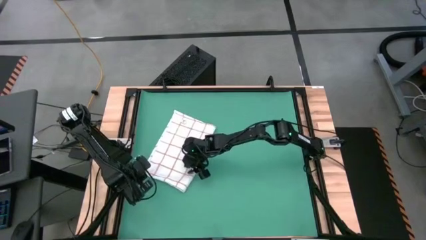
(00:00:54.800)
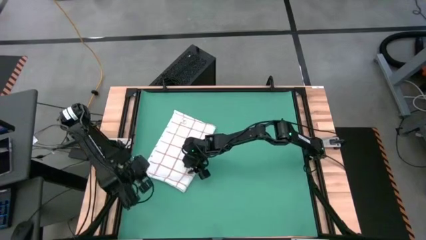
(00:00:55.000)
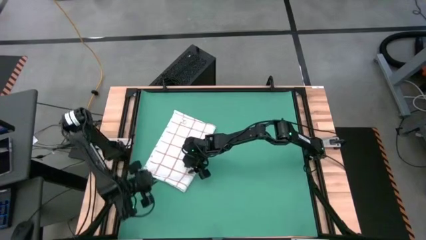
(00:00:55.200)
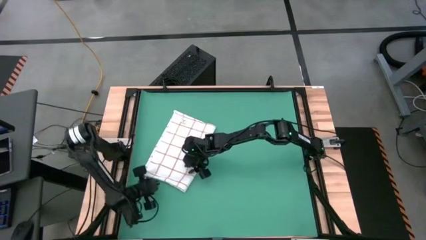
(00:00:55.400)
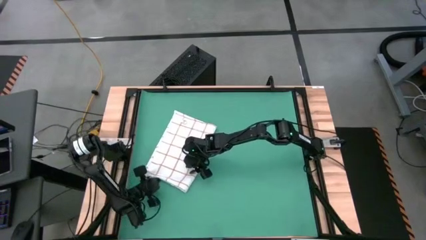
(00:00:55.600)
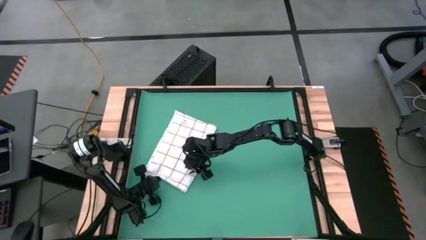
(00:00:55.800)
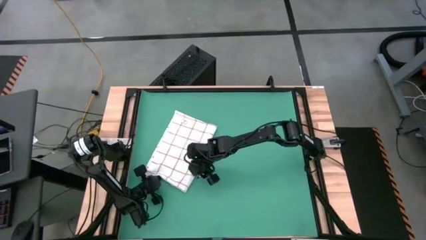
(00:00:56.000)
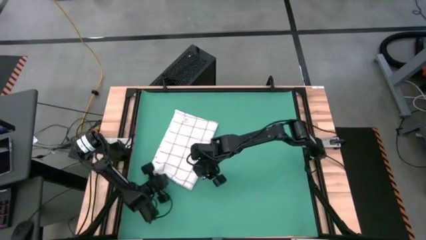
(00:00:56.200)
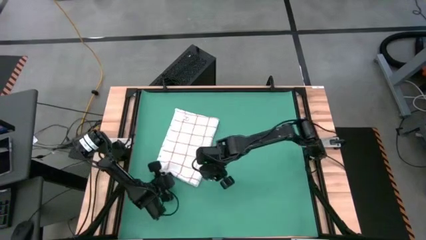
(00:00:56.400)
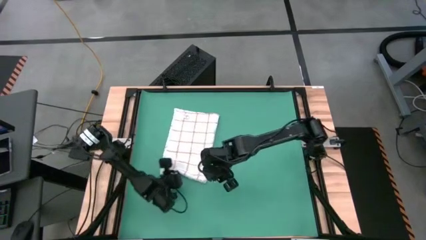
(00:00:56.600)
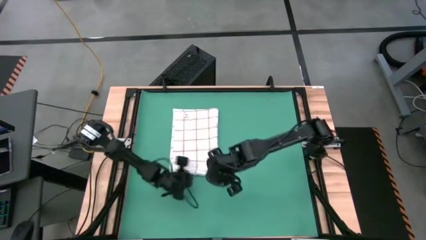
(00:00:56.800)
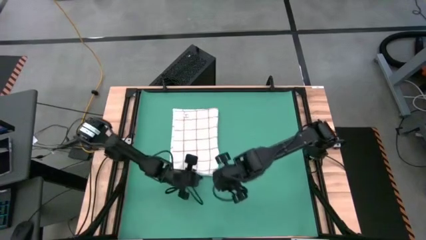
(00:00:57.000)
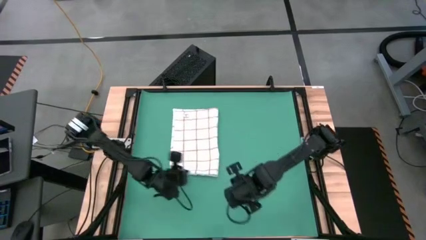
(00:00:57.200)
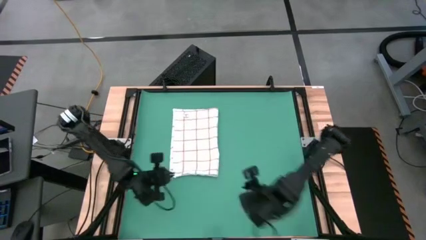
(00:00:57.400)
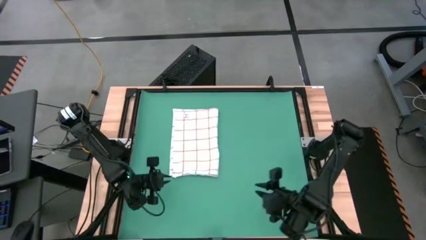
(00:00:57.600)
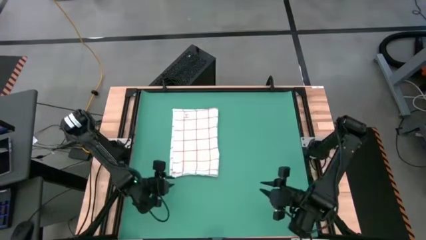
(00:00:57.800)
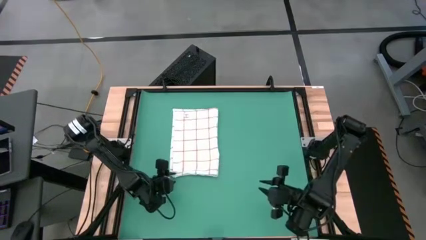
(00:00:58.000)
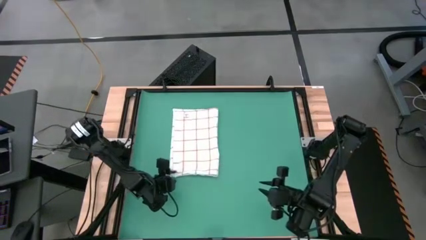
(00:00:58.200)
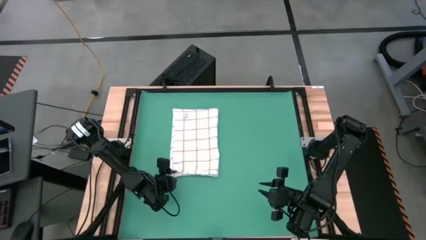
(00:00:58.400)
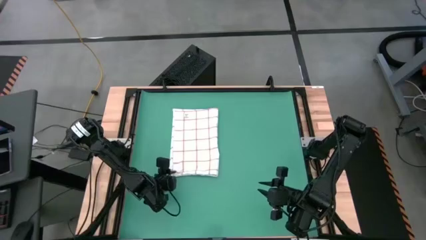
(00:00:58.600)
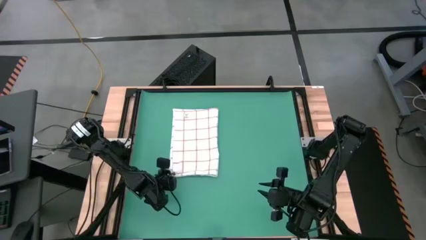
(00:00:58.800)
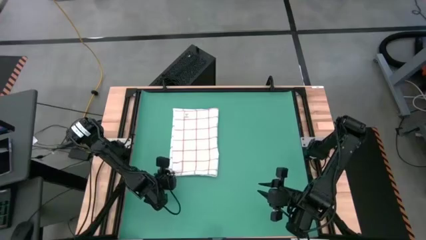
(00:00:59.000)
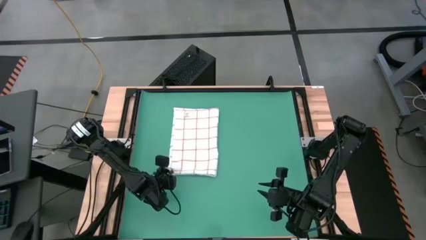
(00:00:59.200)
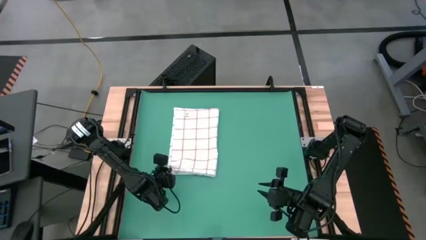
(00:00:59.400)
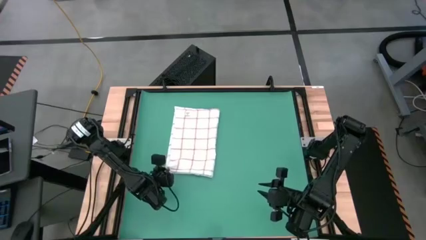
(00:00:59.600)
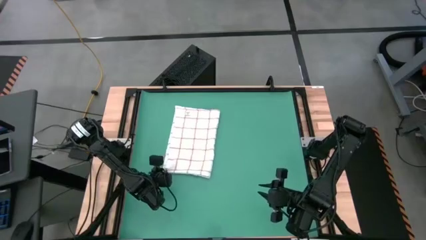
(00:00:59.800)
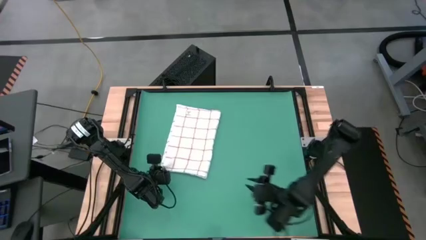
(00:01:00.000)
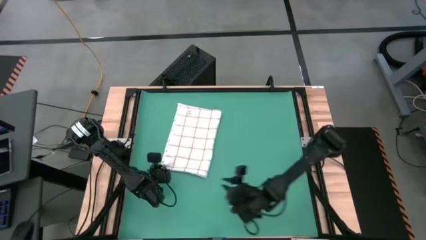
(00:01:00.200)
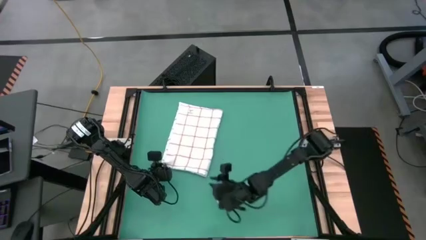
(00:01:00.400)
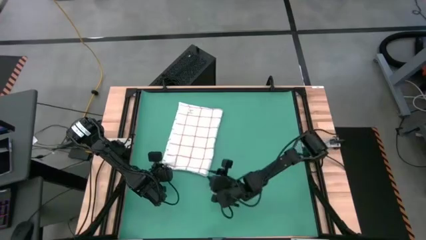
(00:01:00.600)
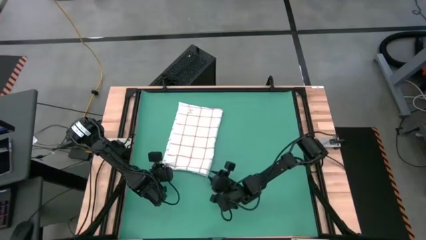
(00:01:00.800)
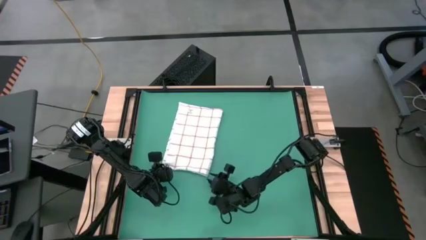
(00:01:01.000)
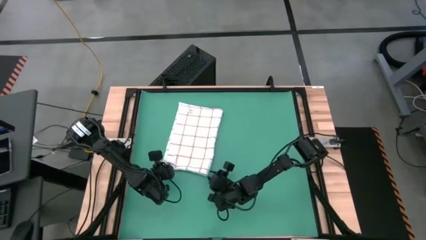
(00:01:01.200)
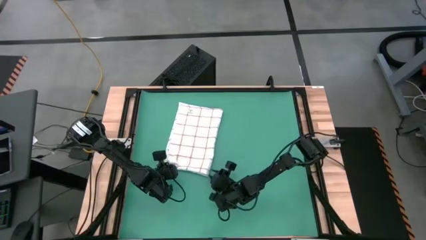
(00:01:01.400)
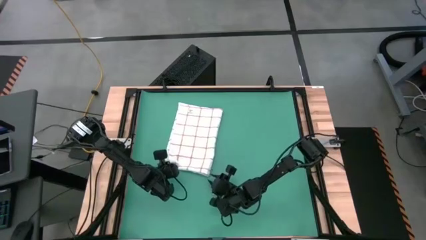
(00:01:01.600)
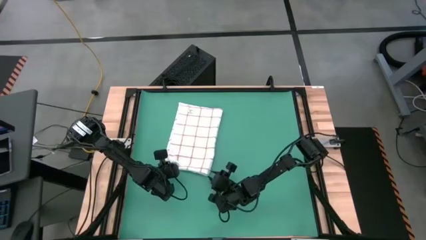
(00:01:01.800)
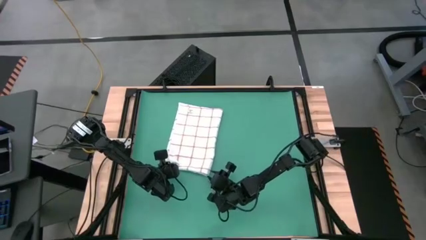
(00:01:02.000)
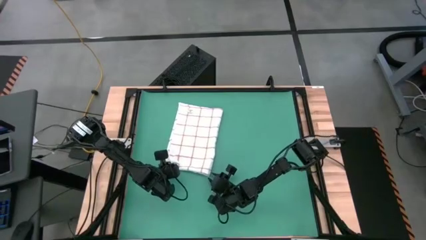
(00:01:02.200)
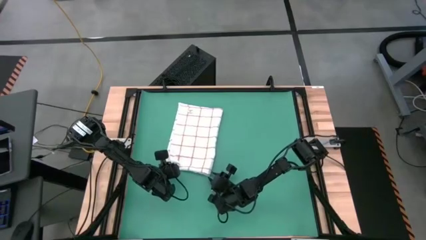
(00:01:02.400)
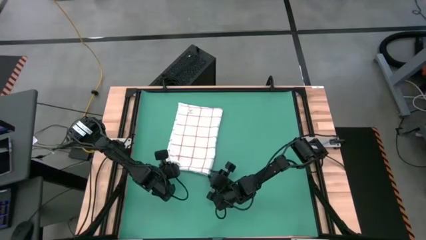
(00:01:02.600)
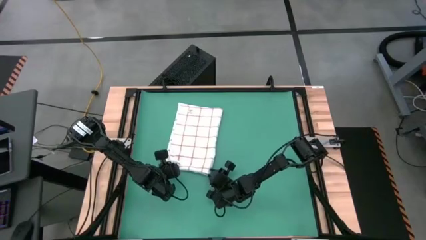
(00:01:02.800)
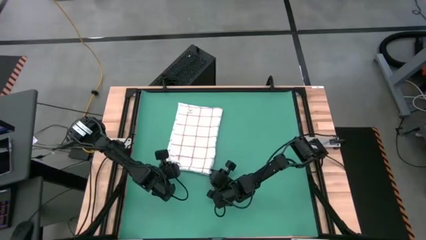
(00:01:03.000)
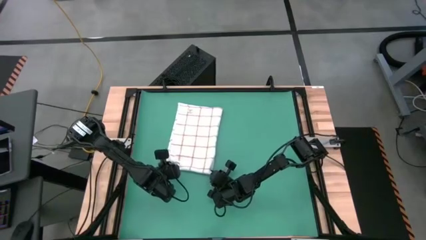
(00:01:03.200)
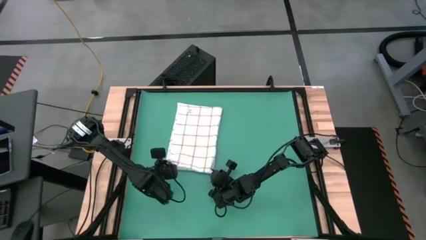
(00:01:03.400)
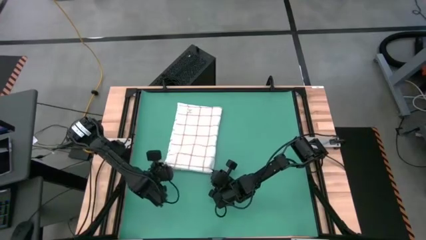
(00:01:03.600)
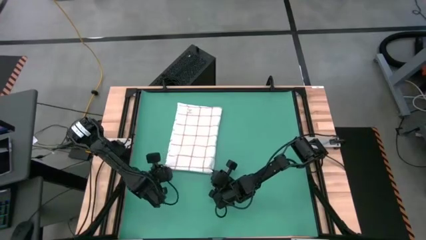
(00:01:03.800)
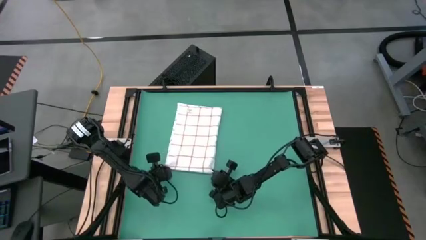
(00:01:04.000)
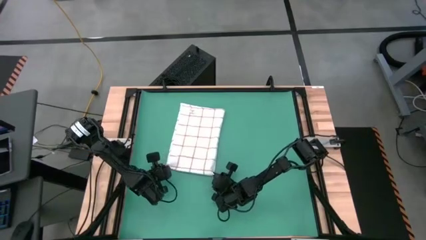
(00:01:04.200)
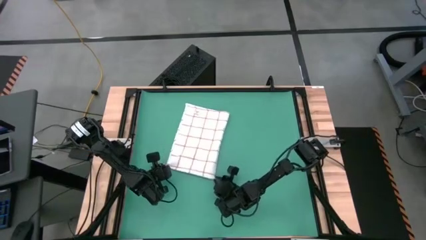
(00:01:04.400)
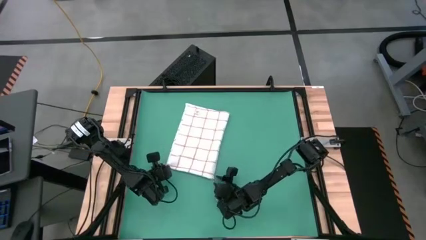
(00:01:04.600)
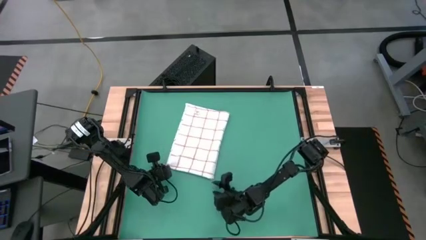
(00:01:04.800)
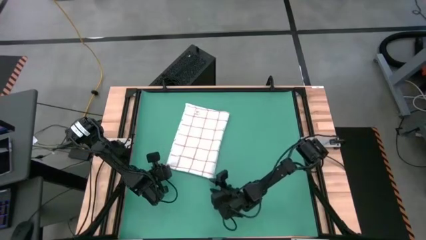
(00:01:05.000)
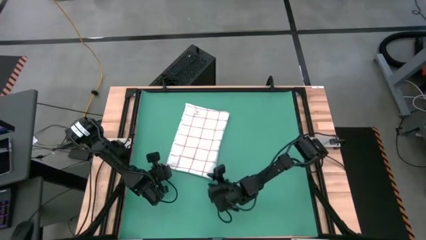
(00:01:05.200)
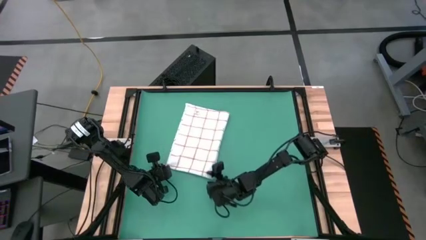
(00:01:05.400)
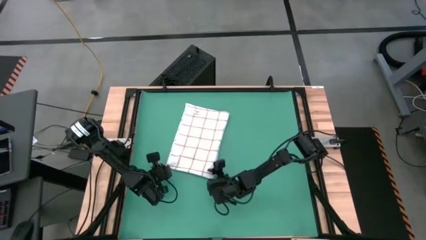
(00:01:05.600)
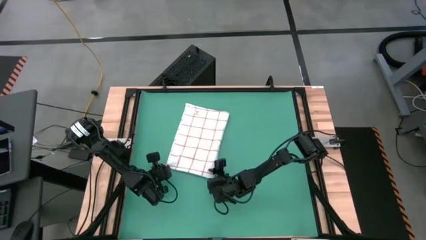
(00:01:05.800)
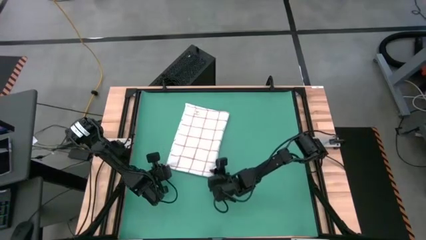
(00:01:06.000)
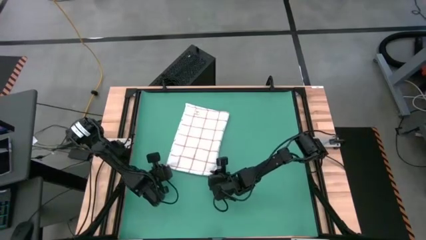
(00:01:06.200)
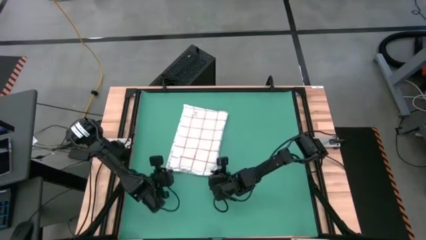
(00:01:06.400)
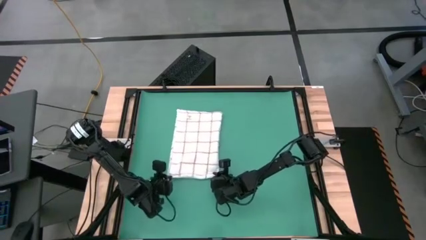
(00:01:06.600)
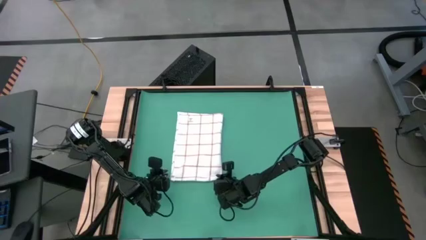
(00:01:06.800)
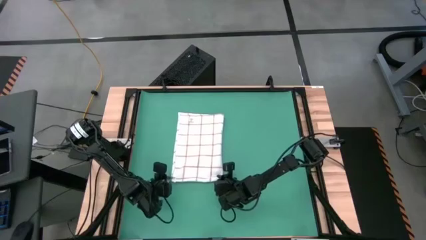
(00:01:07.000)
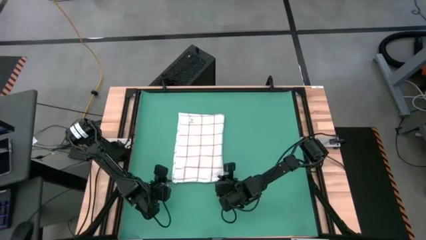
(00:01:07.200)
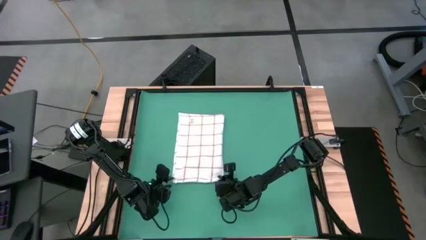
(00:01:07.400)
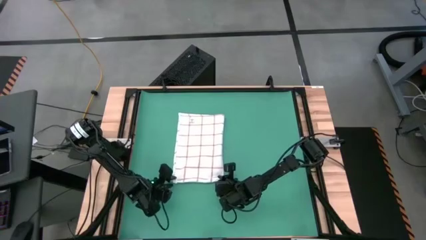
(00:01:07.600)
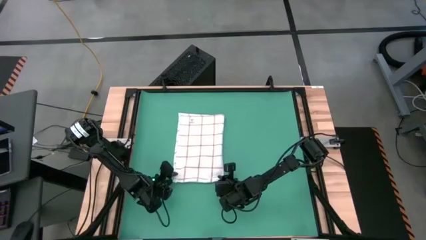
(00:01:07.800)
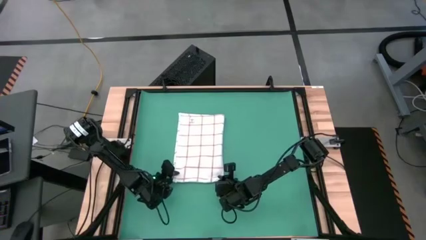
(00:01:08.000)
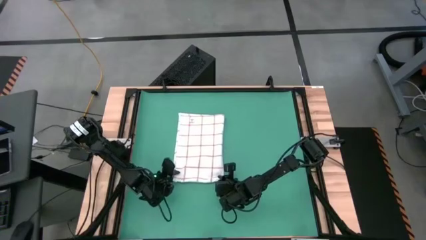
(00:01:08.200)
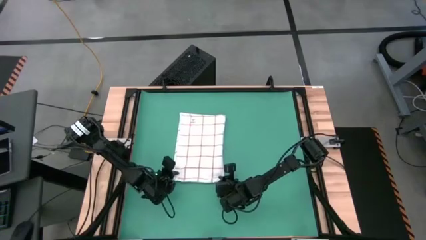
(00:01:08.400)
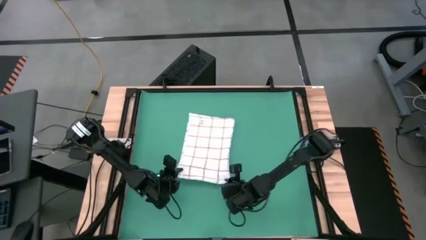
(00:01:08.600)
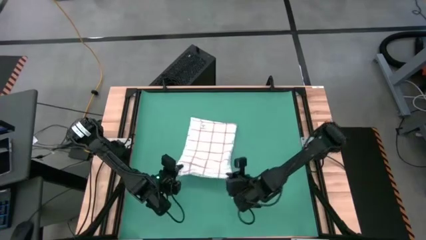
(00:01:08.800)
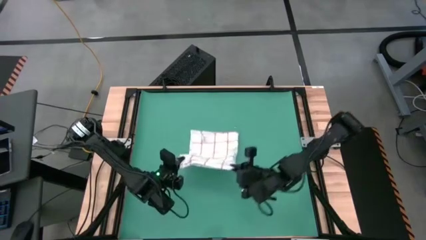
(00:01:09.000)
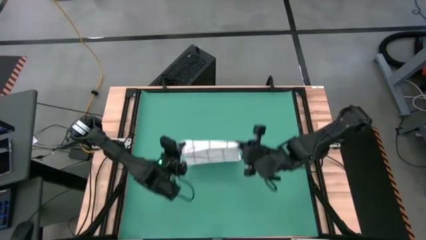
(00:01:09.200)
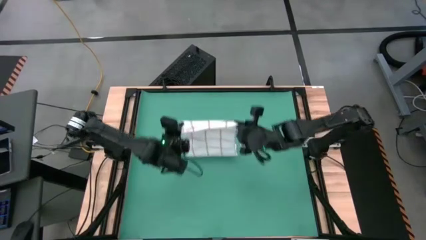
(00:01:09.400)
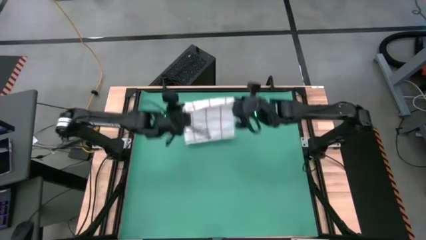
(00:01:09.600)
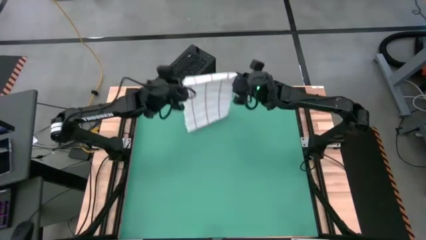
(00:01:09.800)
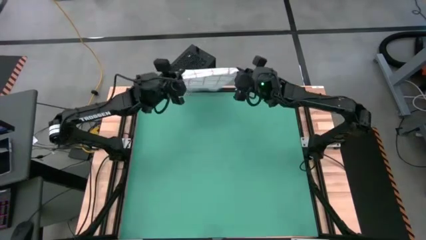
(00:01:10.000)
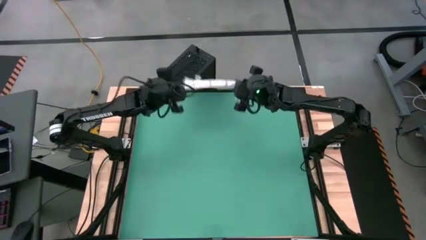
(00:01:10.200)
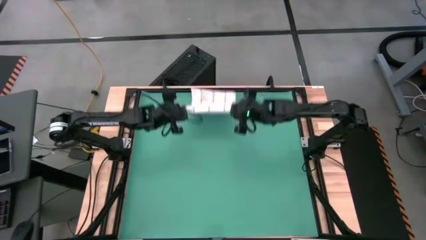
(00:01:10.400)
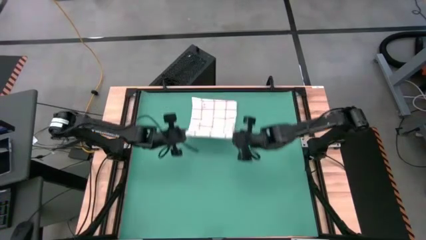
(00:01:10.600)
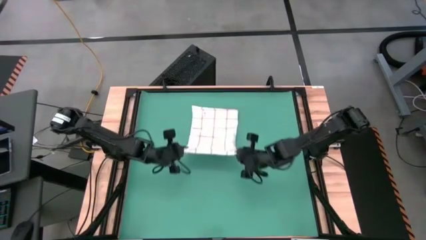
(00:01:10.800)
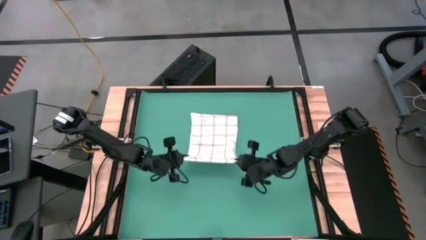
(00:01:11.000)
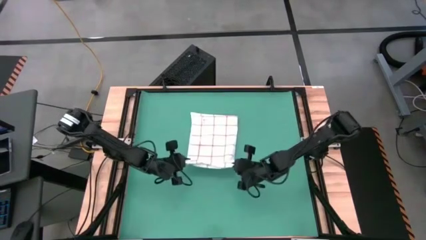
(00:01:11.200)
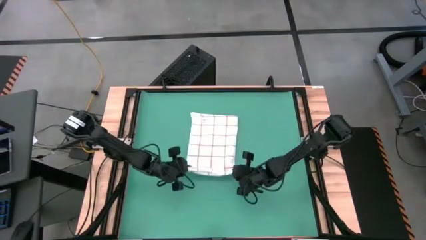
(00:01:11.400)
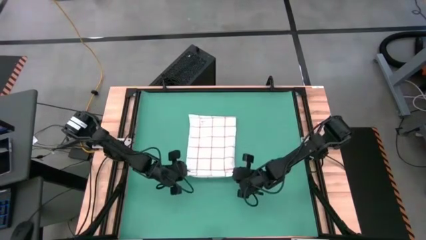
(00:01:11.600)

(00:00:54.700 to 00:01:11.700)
Task: Roll towel
Roll the white towel
